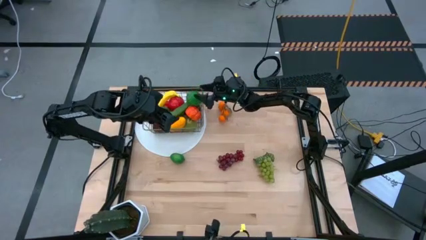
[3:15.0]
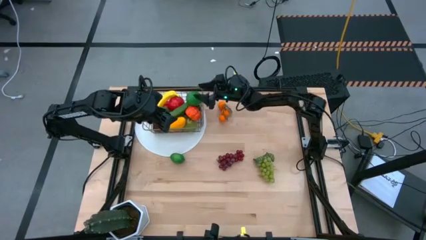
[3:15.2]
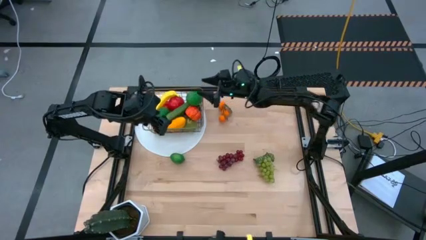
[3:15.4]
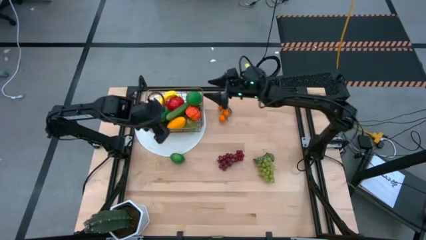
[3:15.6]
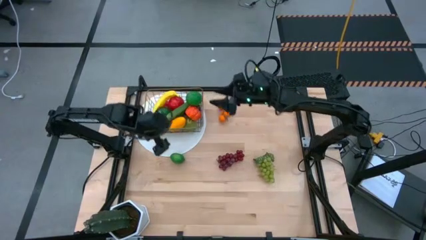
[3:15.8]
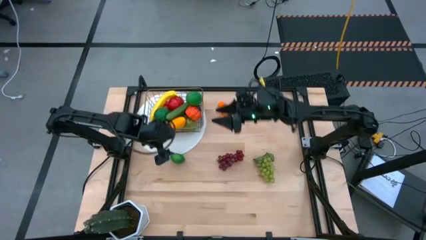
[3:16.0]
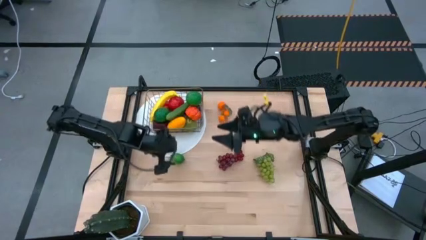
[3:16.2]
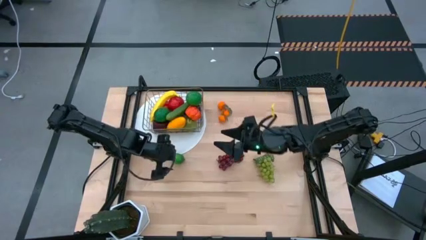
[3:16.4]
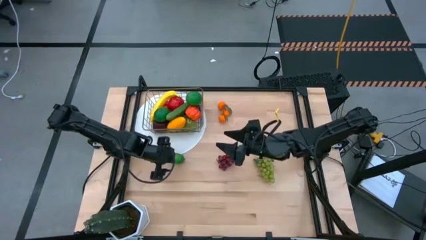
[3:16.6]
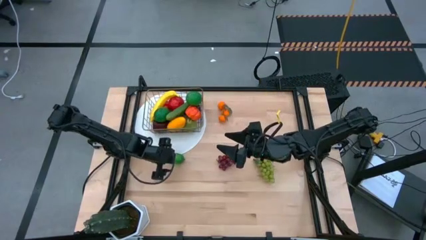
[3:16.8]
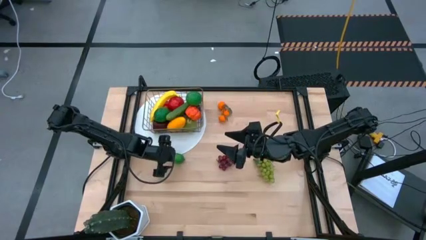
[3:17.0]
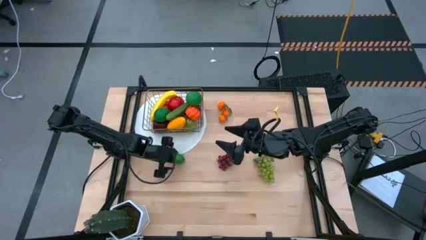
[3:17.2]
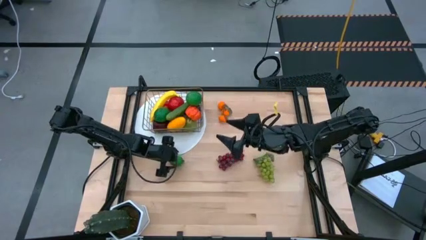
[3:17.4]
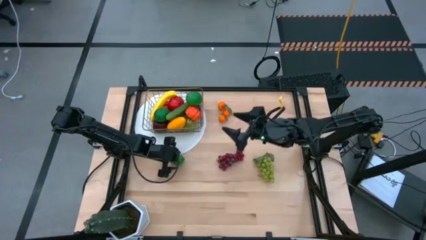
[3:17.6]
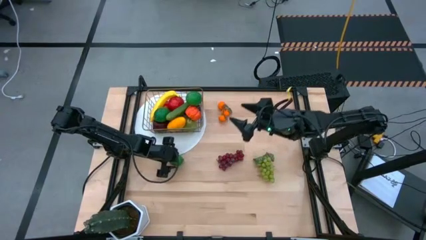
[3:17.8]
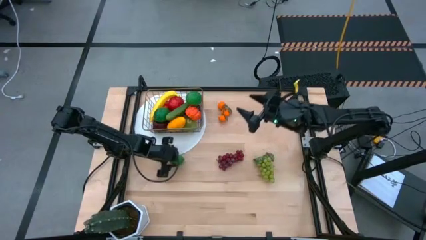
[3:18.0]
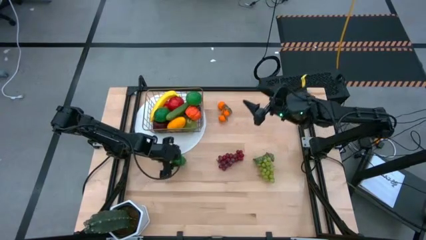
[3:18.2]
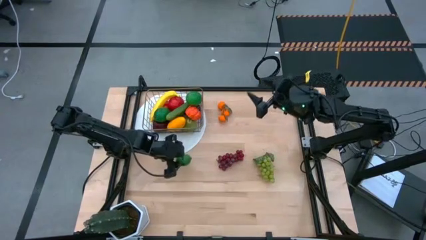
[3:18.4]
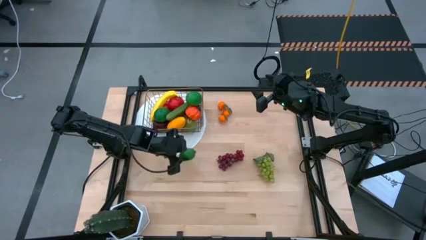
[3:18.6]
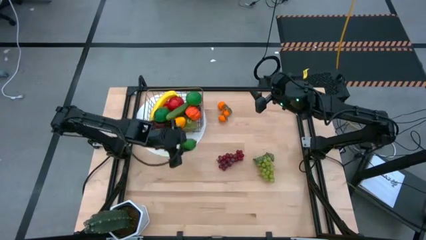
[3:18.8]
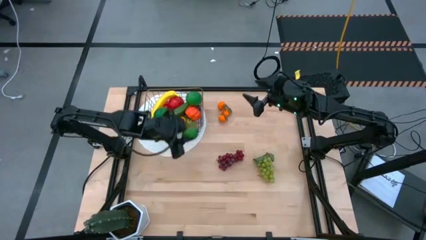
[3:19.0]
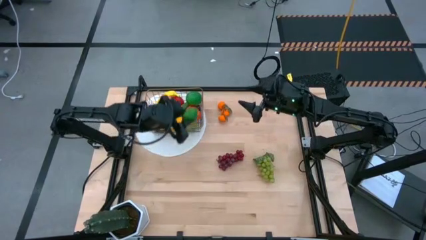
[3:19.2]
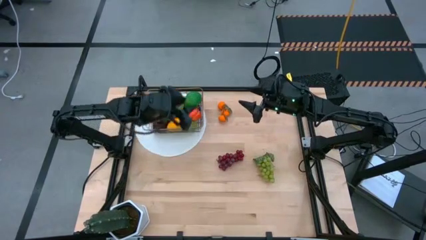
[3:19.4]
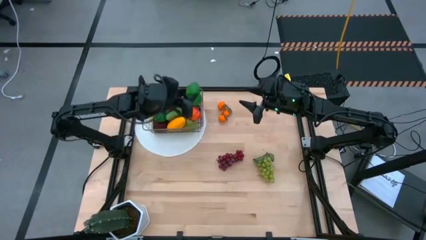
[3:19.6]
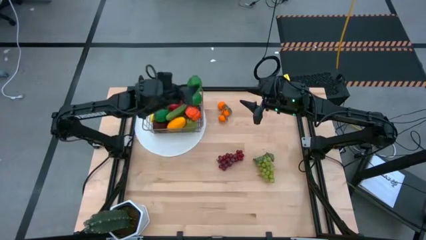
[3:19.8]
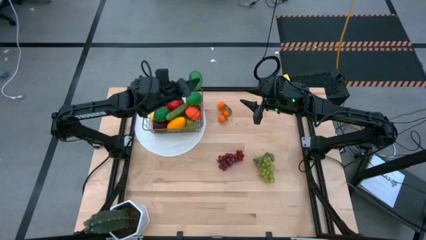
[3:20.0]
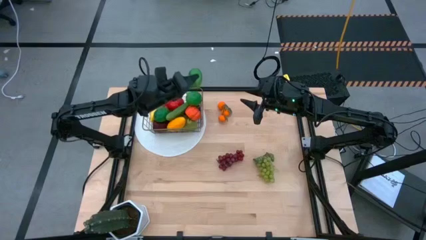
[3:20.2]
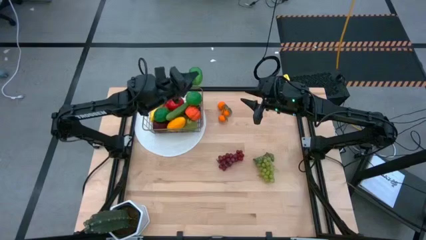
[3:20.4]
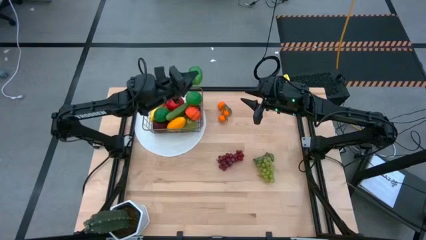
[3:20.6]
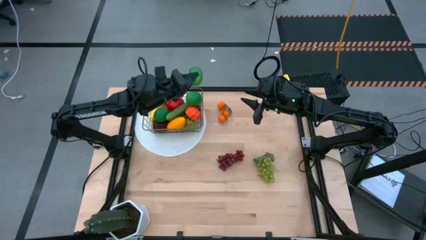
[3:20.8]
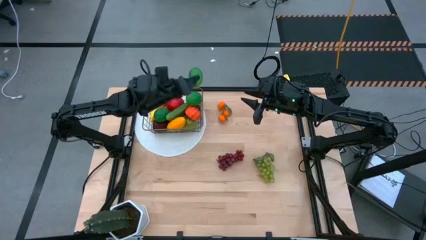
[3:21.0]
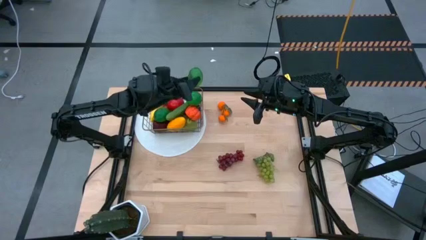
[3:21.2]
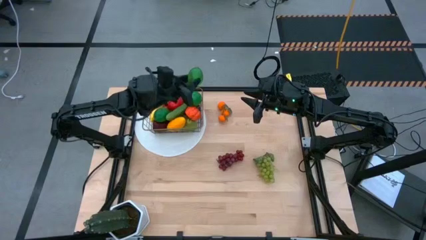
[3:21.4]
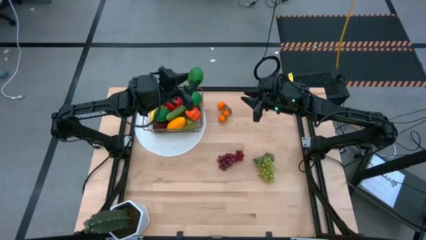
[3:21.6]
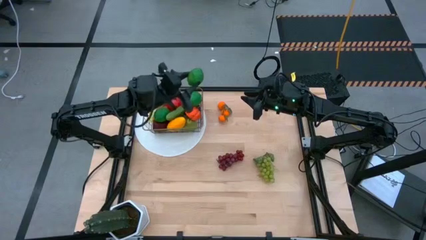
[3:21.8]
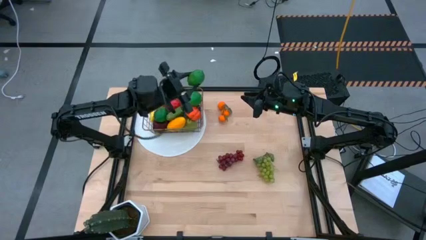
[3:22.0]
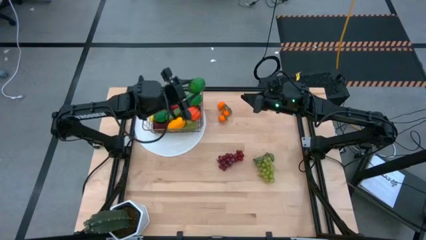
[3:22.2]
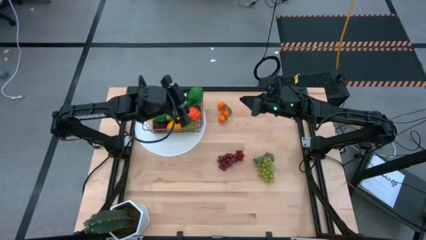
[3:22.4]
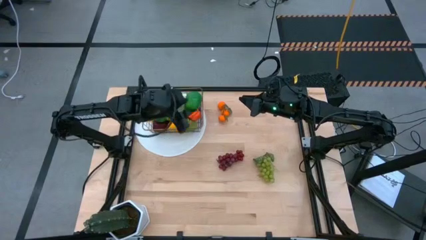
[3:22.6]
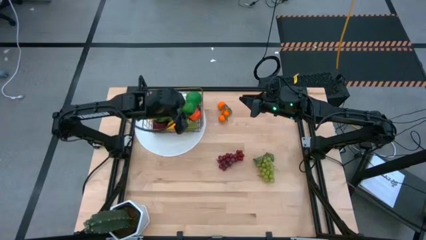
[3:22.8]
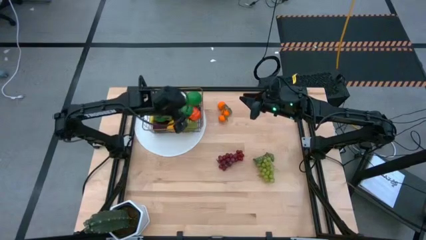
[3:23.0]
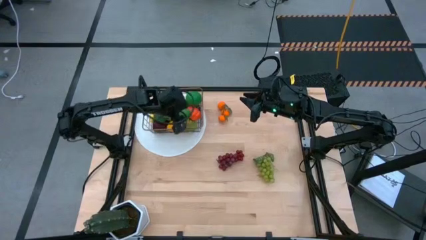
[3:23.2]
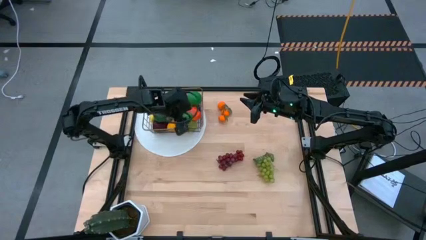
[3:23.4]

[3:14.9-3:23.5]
Task: Build produce basket
Put the lime into the wired basket

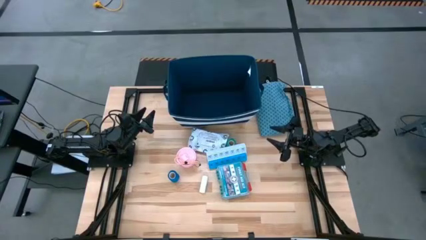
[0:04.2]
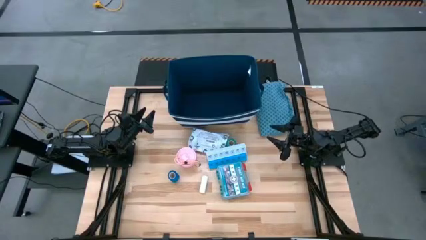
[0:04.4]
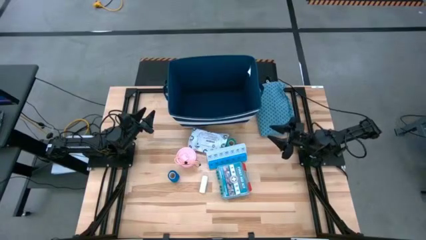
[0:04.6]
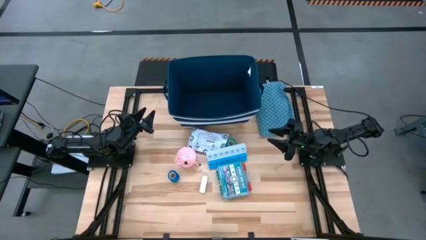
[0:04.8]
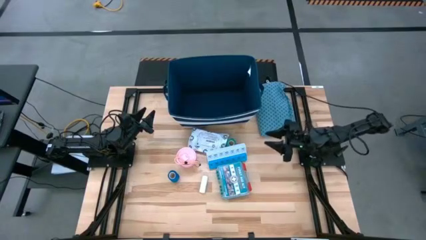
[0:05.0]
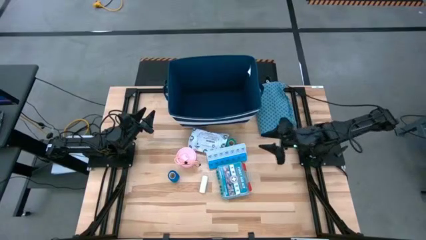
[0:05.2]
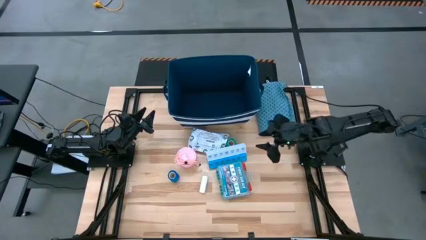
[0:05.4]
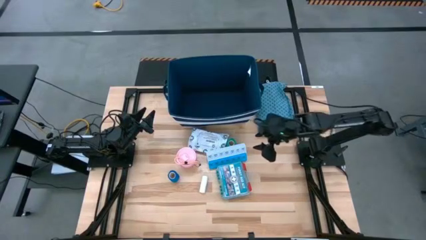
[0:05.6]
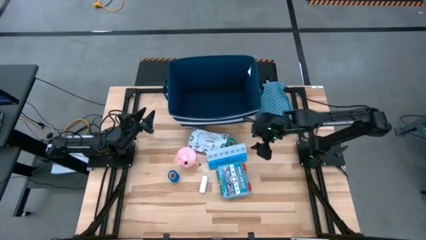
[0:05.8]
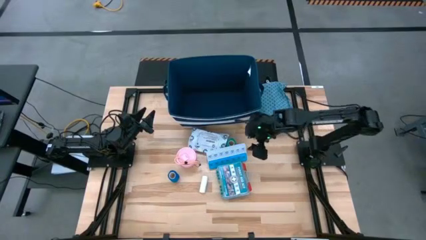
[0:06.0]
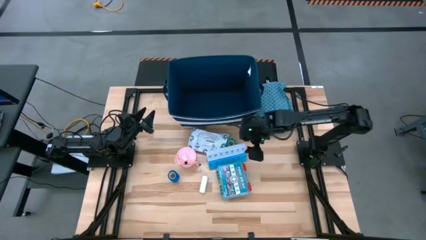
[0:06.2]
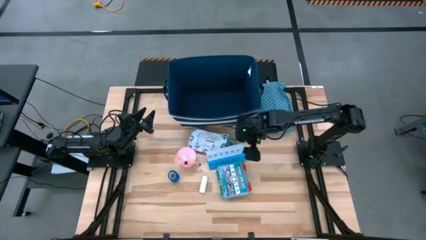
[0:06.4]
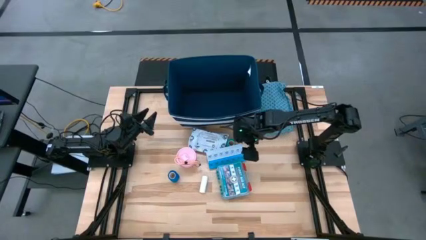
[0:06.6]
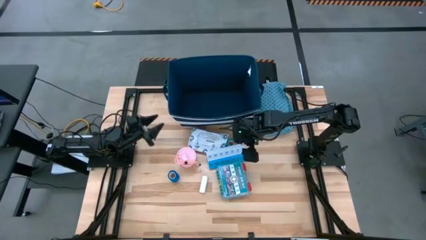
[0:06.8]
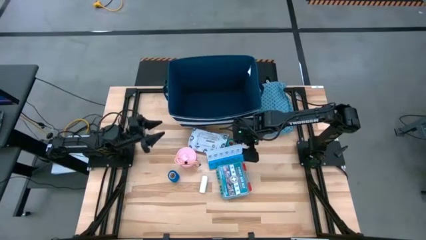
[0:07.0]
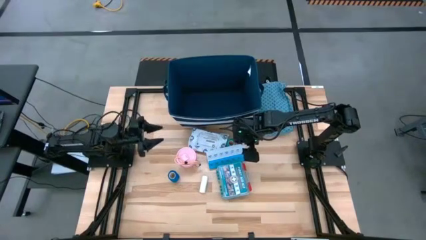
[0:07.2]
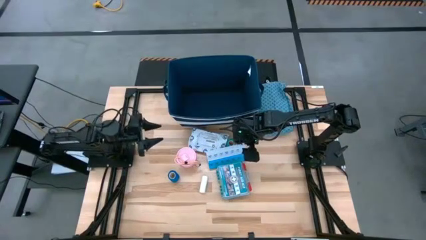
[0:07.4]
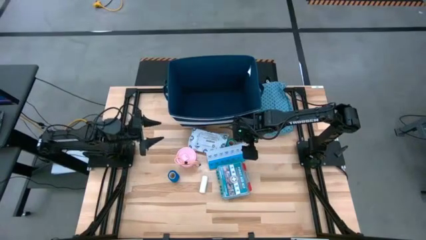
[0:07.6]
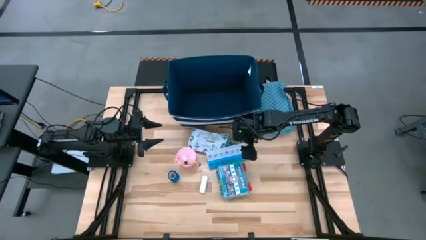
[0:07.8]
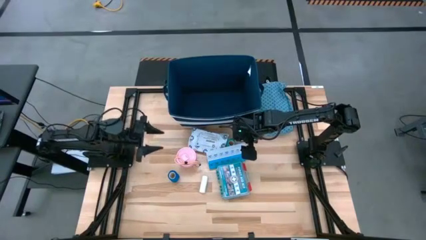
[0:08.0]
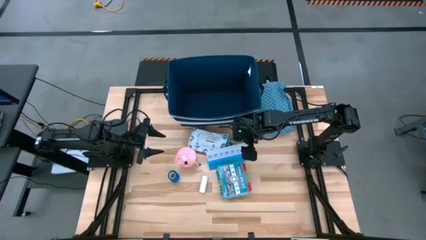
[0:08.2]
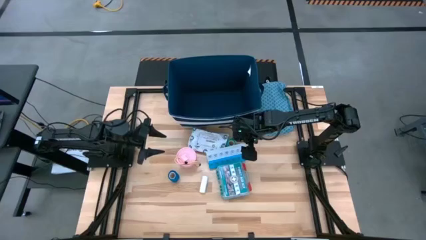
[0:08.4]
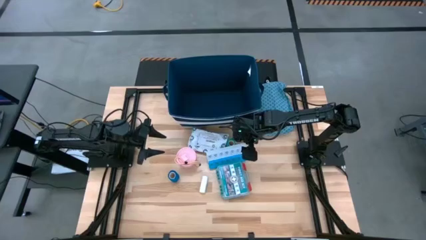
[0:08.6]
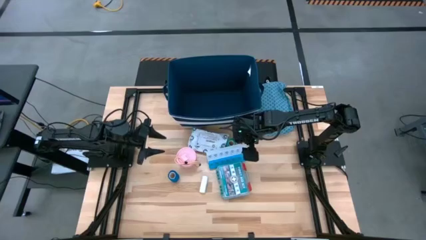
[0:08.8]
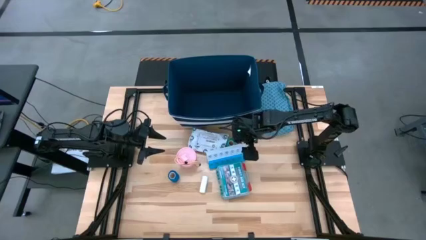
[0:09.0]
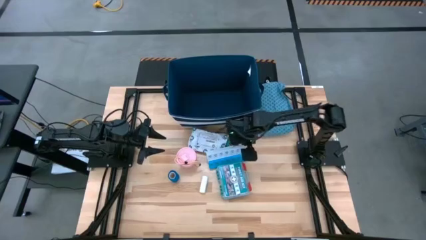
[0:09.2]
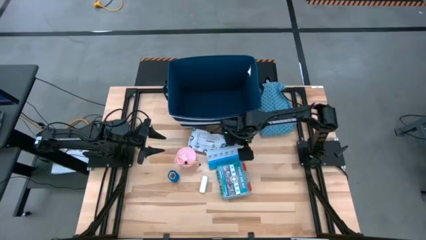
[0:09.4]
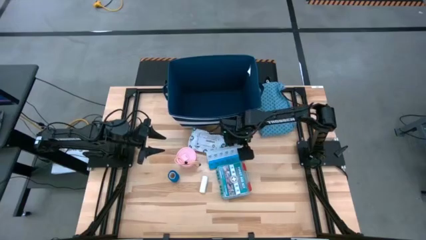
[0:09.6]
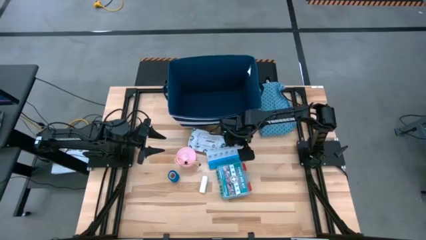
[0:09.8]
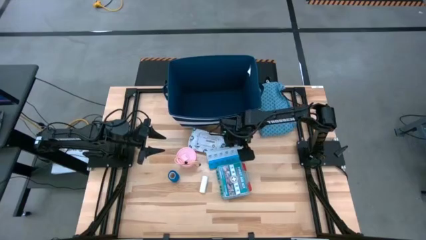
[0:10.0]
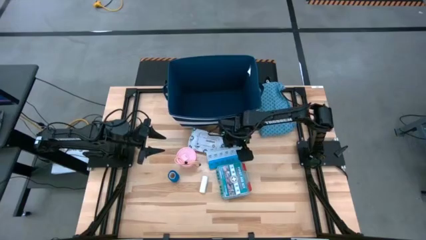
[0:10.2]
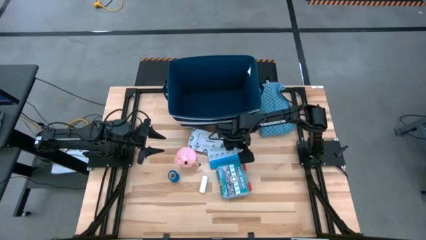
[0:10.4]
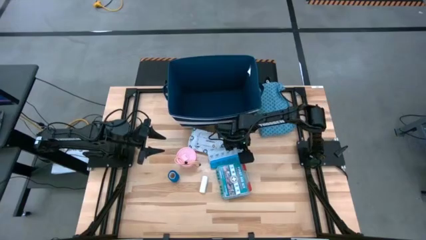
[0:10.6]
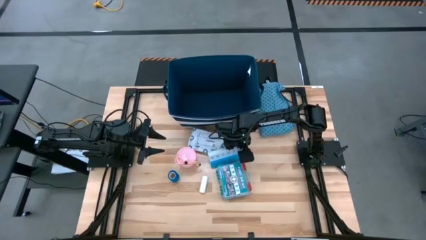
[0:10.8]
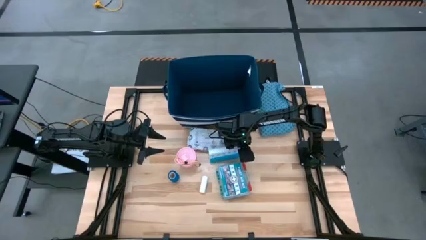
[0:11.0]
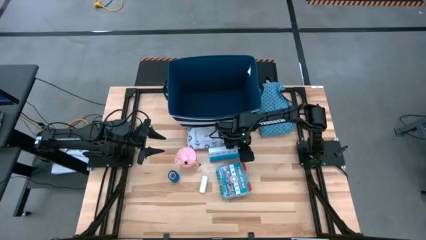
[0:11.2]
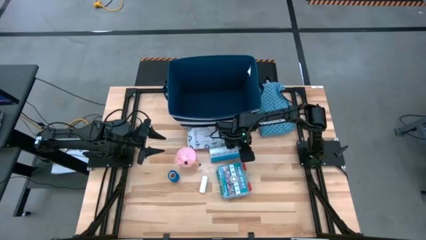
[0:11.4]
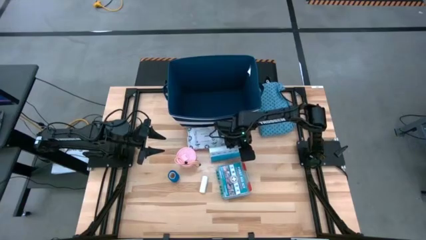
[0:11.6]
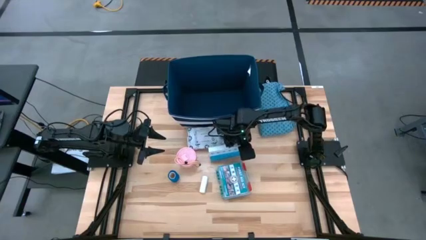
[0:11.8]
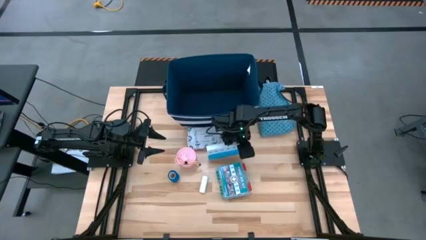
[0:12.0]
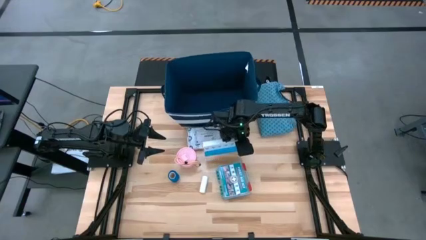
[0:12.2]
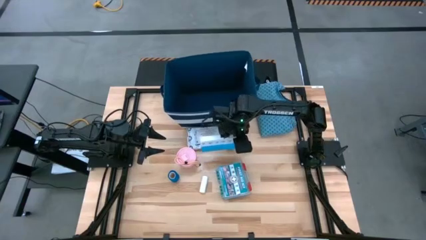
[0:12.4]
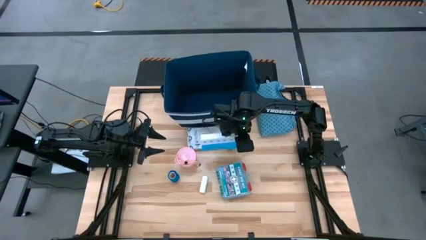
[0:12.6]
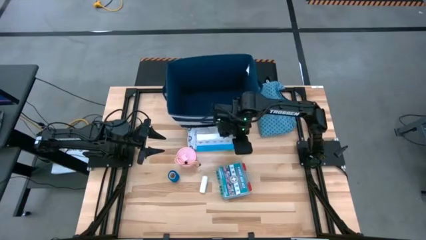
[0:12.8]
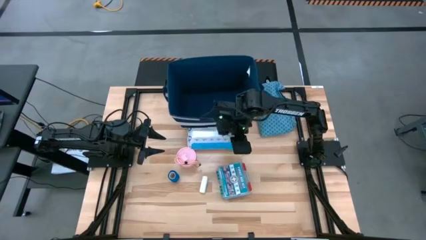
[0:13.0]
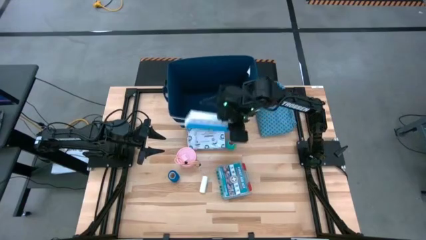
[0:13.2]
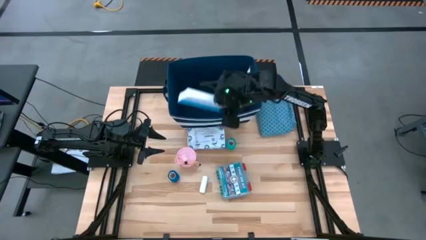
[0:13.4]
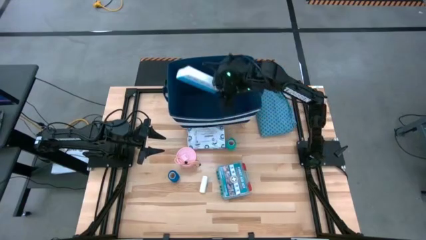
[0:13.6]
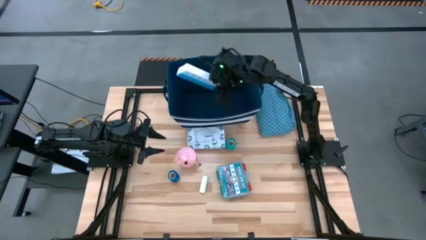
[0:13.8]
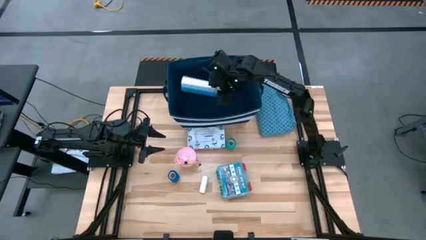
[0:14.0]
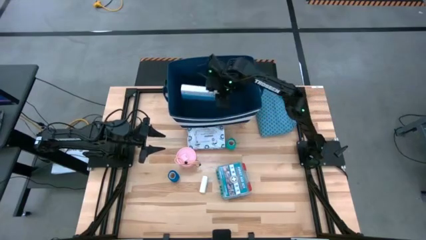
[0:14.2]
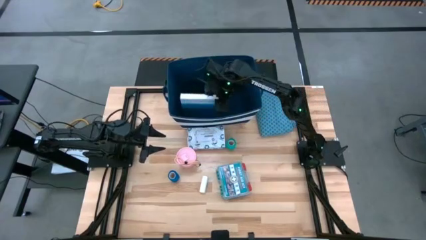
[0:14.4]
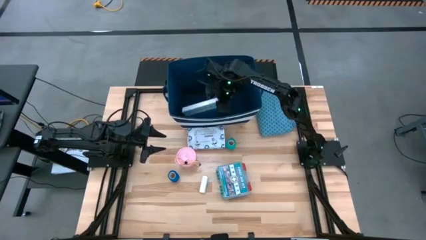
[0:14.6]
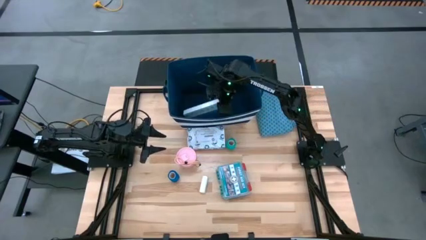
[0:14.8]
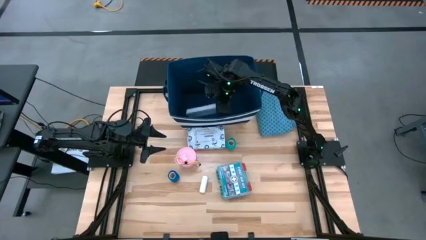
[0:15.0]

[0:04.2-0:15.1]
Task: Pick & place medical supplies in basket/bin
Put the blue pill box into the blue bin
